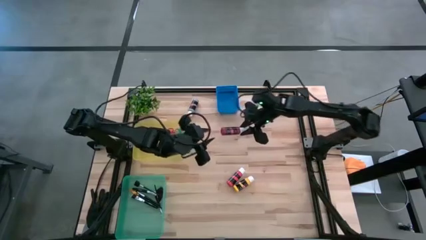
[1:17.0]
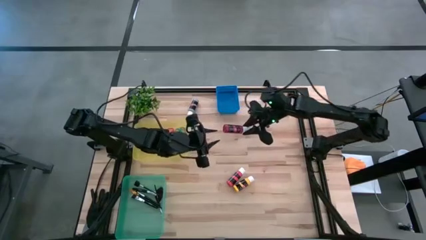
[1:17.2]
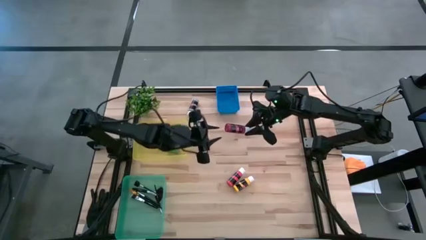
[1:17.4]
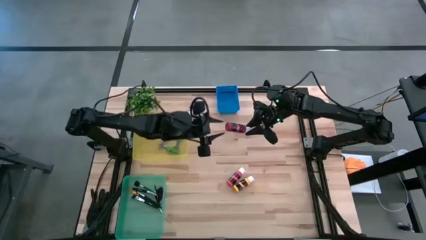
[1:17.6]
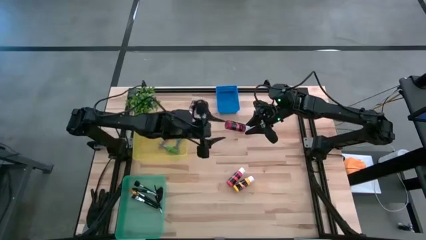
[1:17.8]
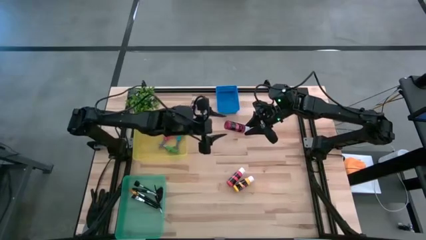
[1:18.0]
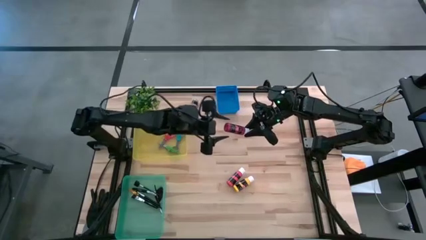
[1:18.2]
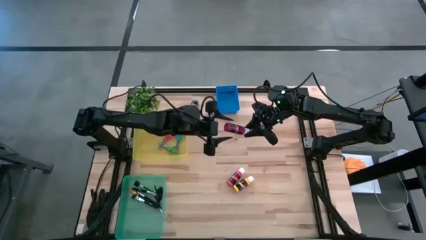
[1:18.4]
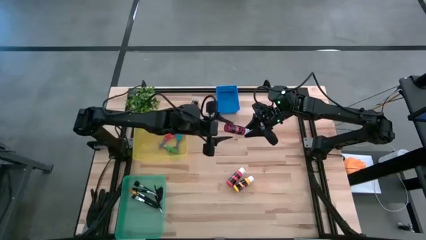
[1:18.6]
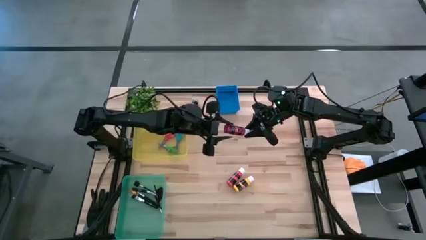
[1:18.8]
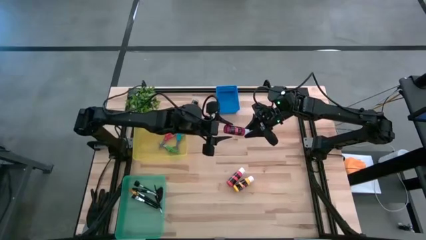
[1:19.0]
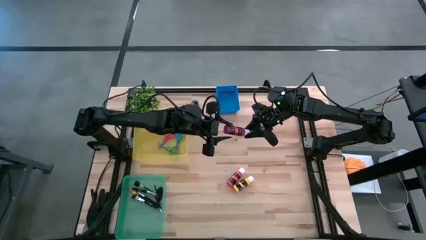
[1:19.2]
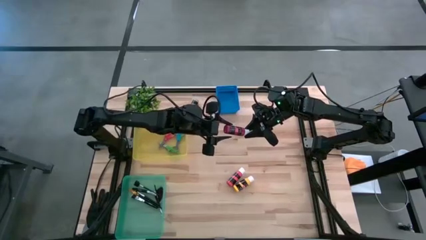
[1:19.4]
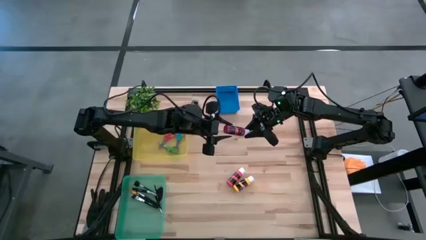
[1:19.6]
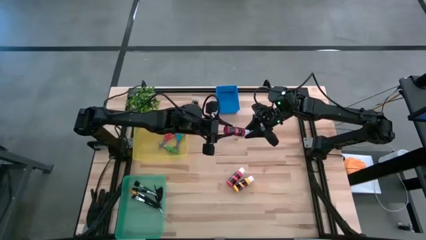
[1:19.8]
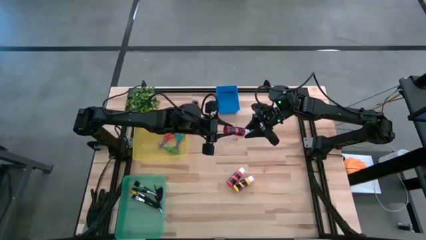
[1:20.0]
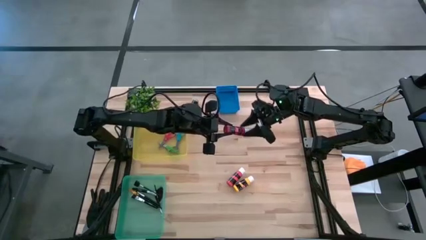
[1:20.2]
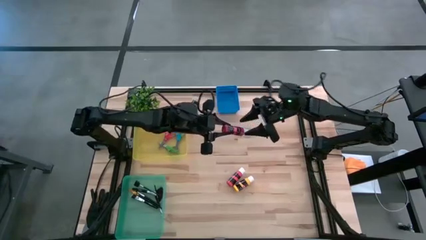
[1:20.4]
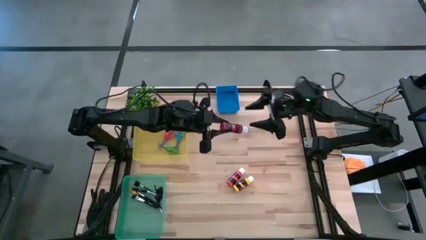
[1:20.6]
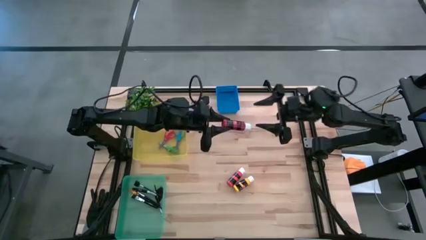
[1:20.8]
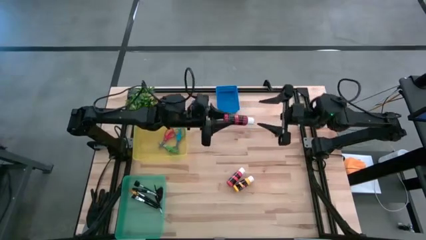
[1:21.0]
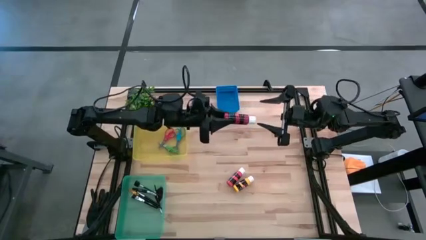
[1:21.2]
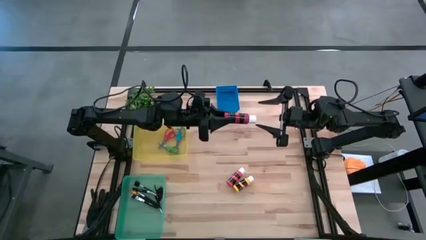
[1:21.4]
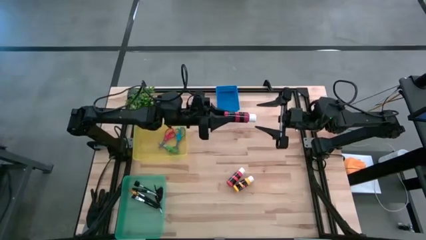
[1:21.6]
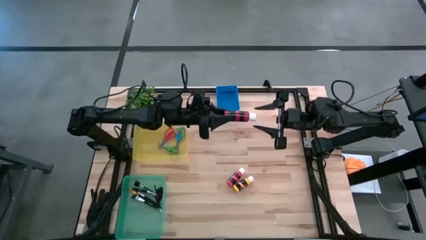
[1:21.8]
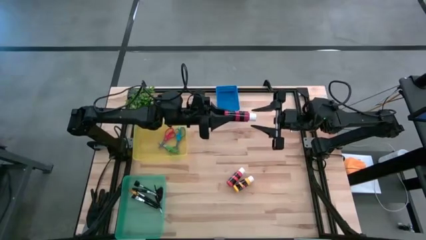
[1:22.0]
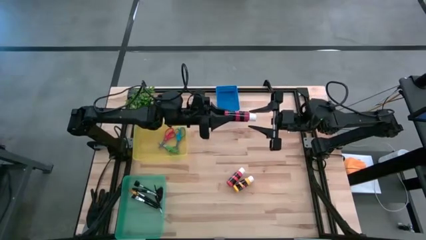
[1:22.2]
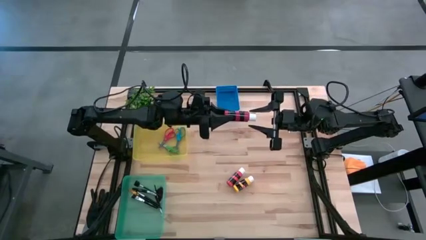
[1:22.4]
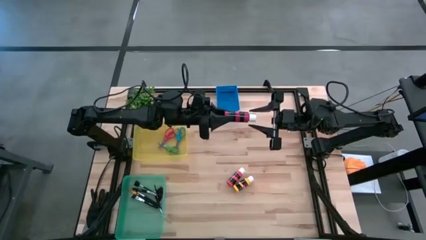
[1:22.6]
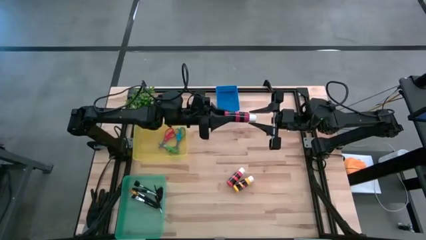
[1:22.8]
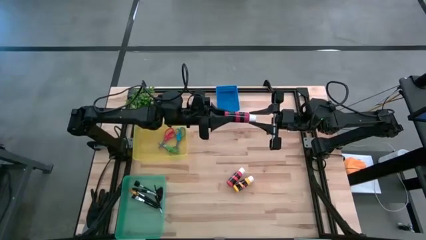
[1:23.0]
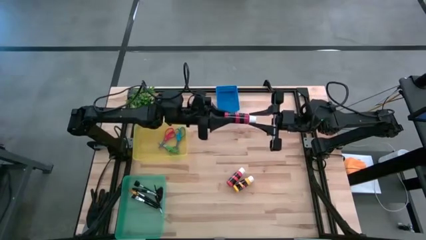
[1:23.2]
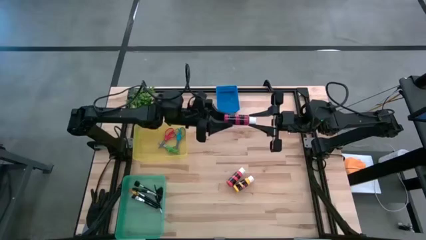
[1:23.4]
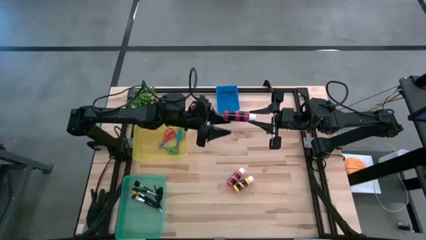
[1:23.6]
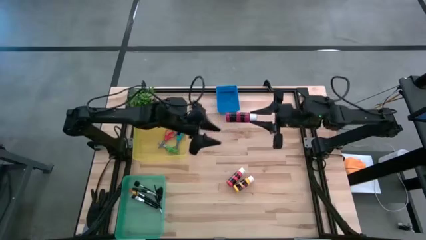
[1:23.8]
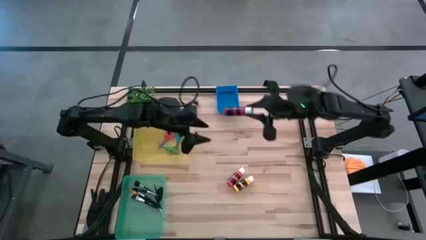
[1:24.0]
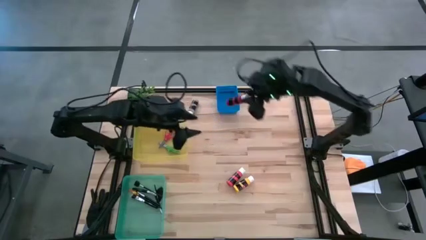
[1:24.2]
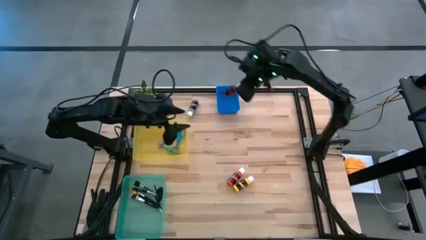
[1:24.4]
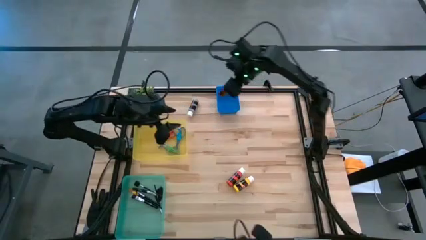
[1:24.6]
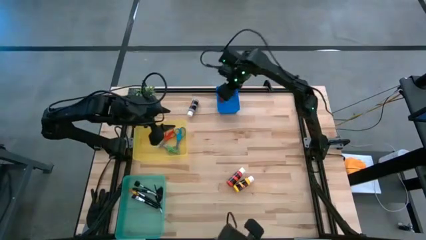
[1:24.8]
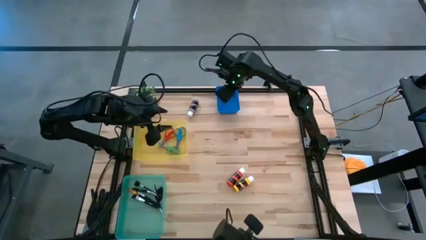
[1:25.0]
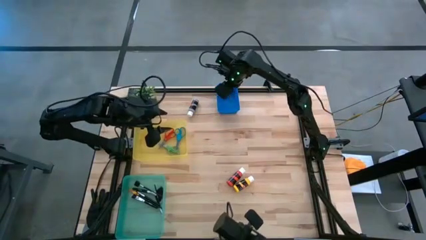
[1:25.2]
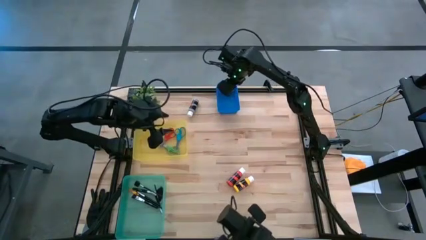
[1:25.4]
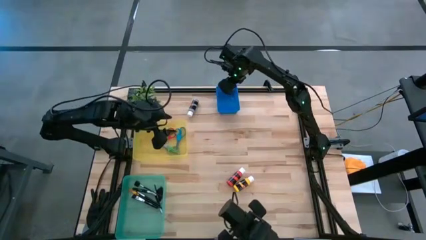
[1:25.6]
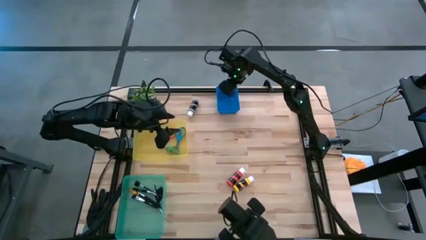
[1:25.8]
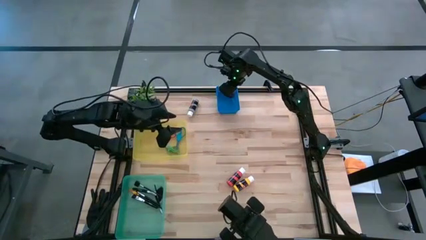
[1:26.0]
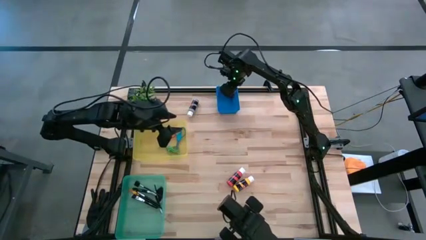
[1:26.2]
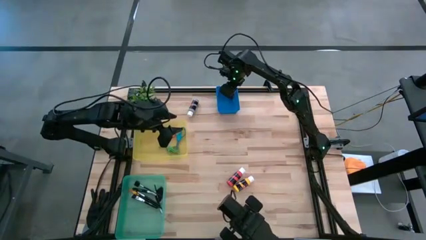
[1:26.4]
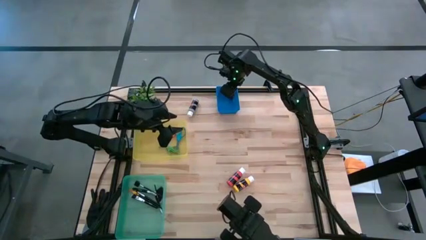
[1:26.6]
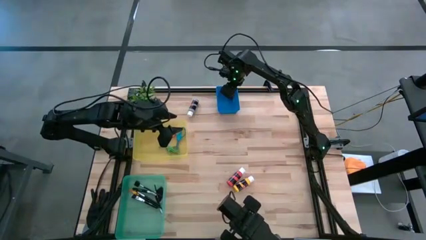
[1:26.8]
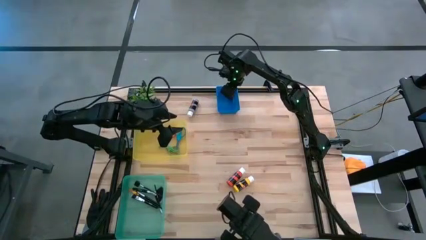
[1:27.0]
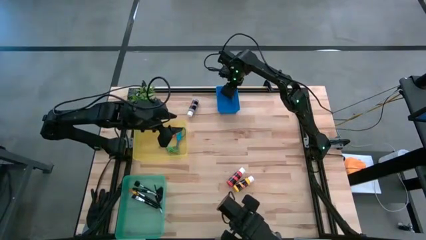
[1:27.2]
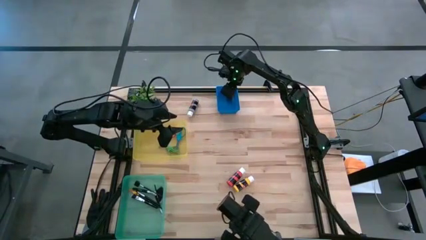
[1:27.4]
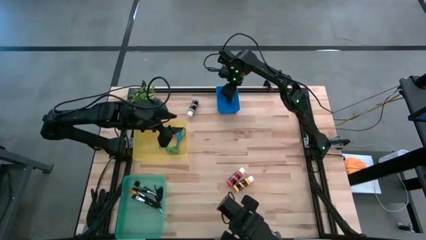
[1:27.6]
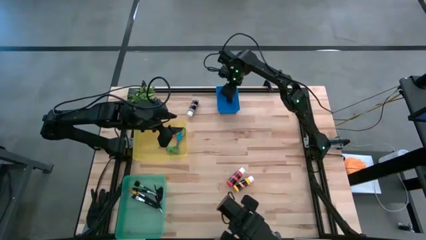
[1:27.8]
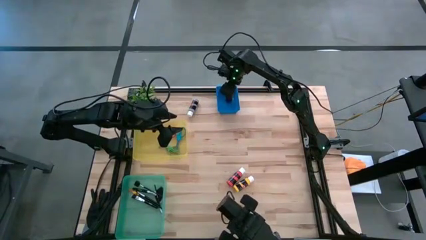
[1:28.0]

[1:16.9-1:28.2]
Task: Pick & Place Paint Supplies
Put the red paint bottle into the blue bin

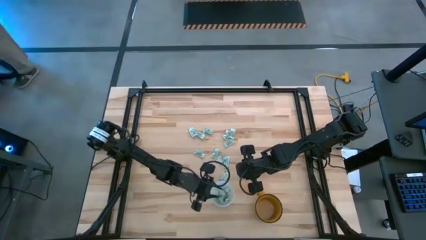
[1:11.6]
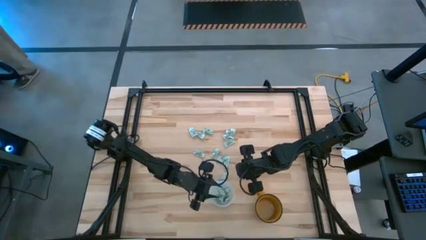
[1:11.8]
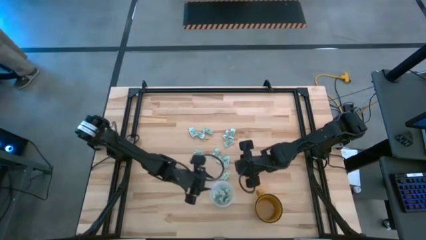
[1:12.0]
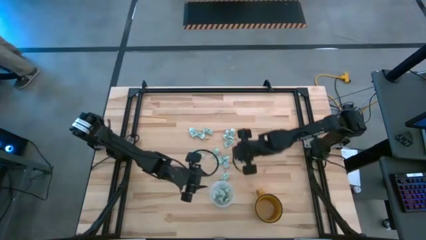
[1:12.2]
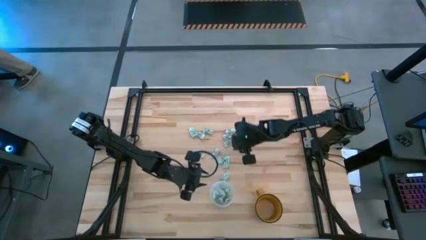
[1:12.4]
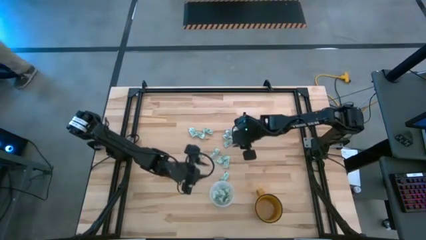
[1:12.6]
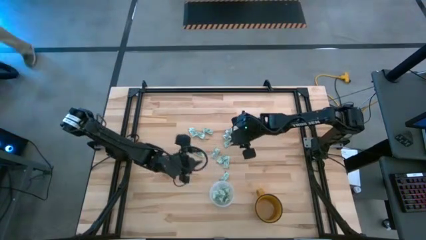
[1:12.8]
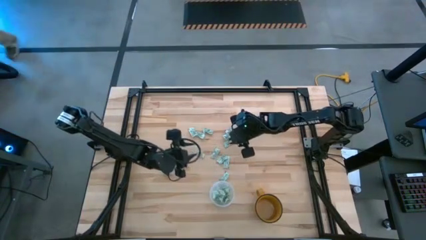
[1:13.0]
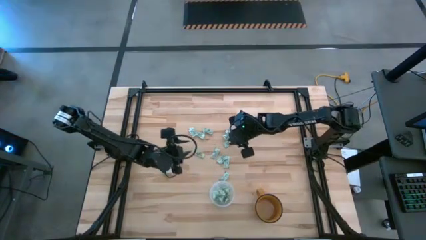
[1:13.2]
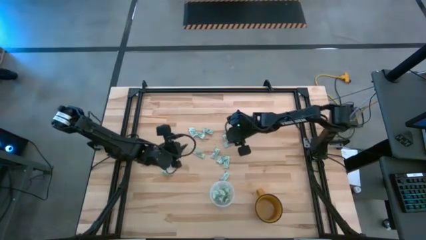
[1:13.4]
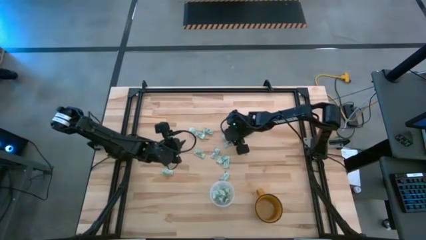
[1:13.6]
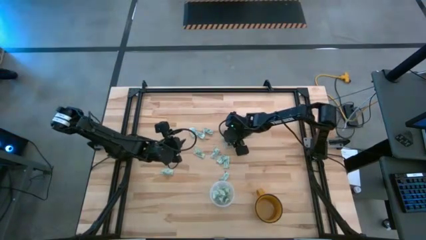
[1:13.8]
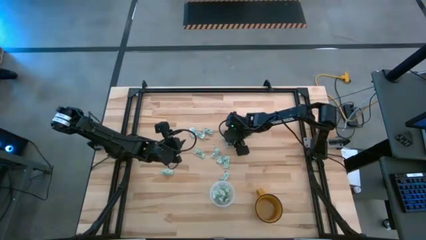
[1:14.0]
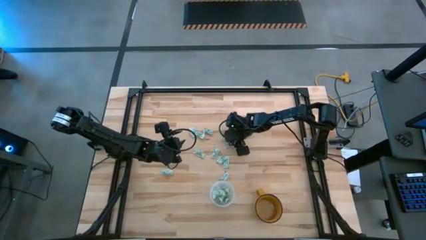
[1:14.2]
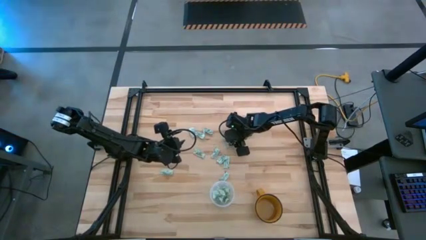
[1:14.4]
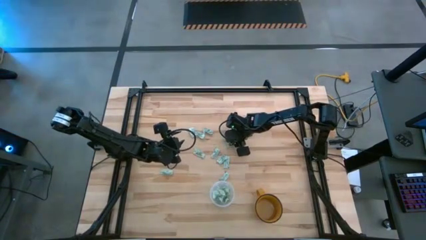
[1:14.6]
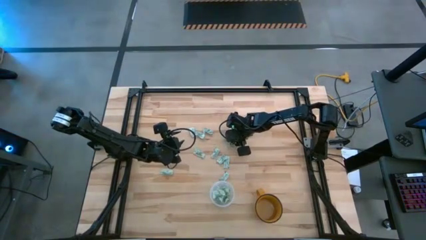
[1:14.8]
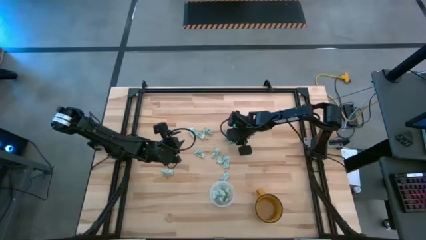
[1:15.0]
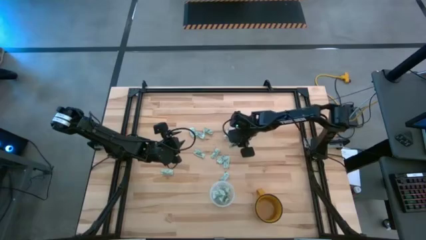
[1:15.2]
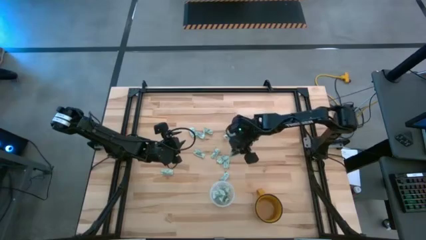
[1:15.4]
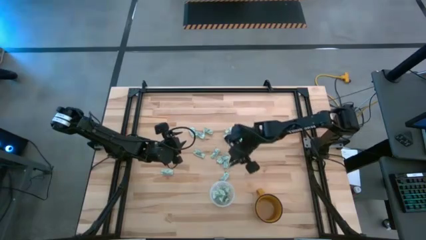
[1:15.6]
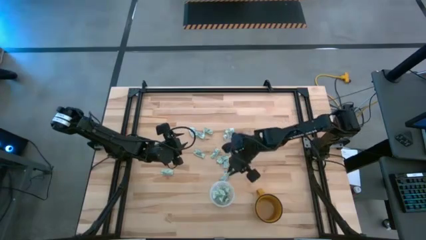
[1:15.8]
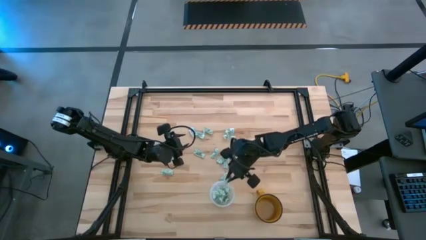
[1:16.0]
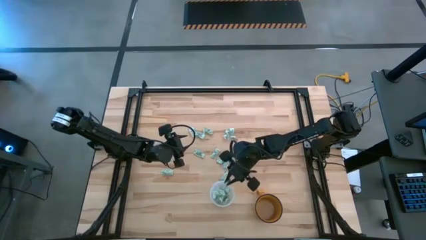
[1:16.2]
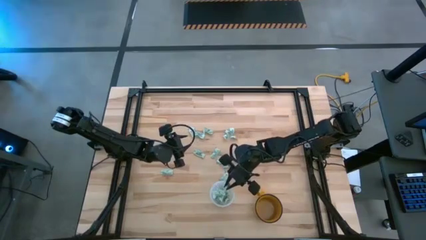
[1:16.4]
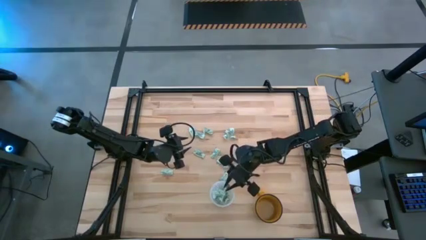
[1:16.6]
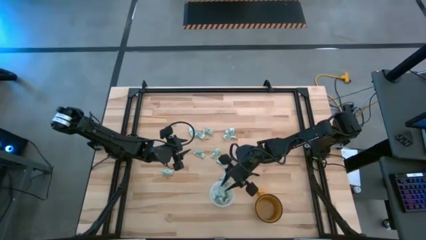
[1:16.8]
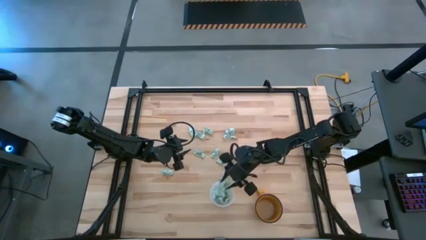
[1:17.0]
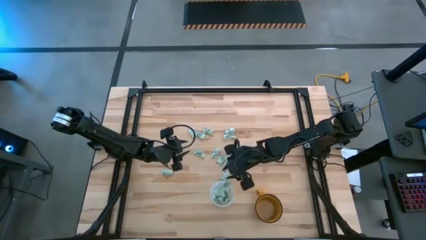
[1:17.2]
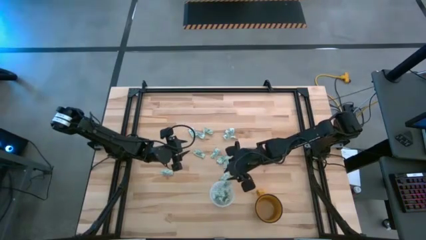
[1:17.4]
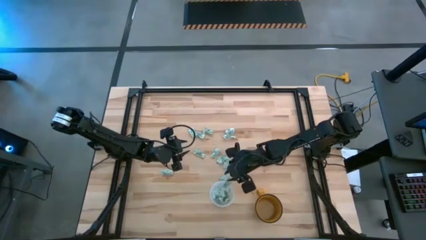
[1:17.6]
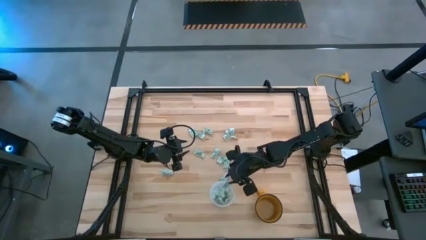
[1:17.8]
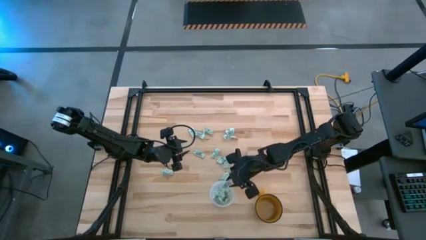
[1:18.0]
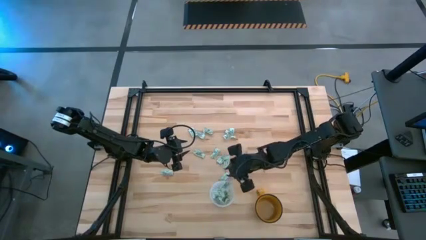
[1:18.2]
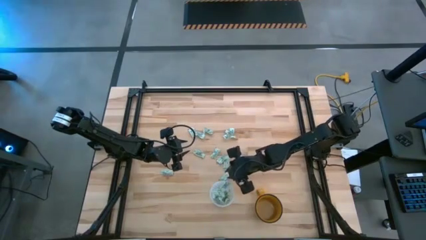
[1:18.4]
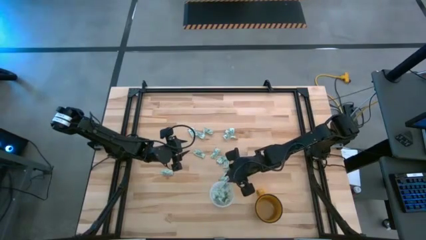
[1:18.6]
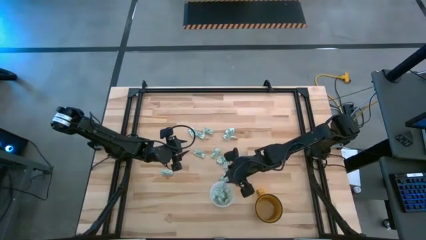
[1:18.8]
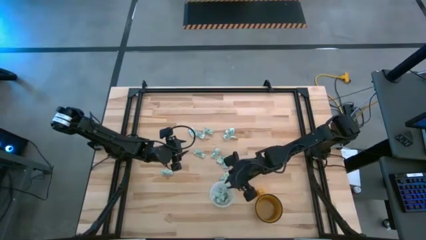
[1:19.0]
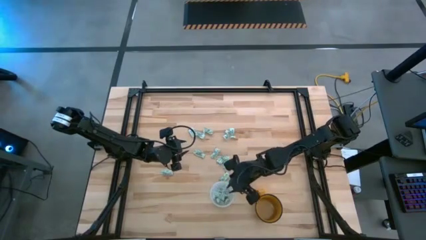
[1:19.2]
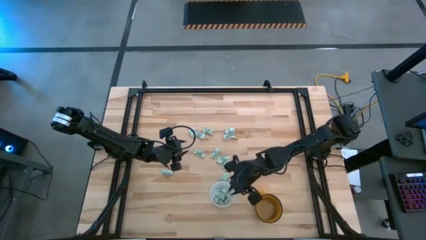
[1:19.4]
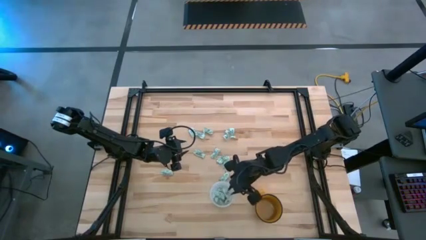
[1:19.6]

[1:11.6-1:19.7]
Task: Pick and place Stevia / Truvia into bins
Put the stevia packet into the transparent bin
